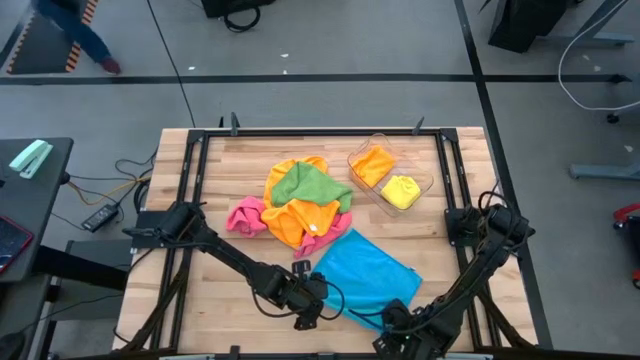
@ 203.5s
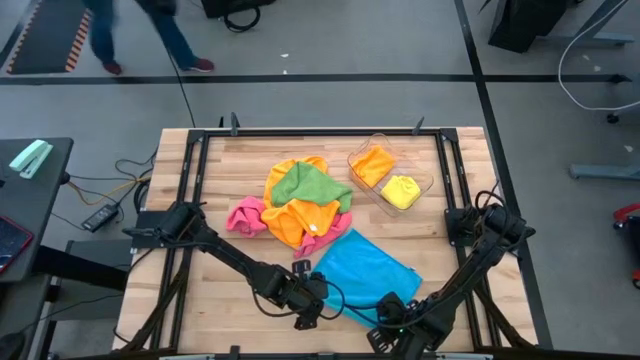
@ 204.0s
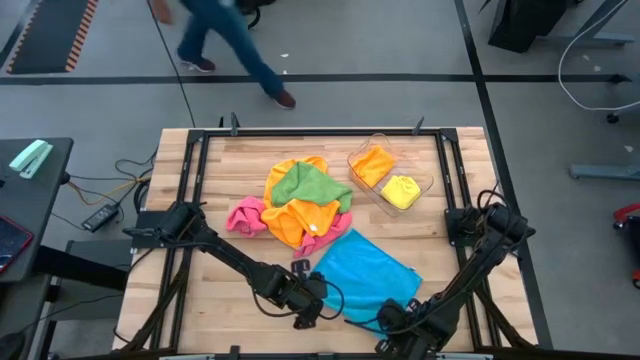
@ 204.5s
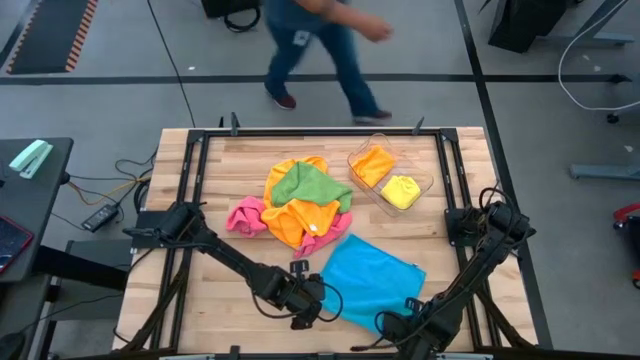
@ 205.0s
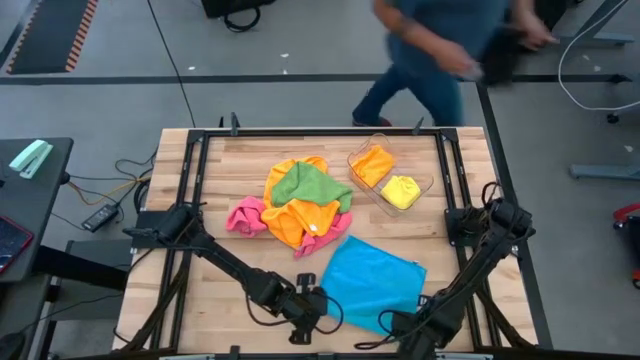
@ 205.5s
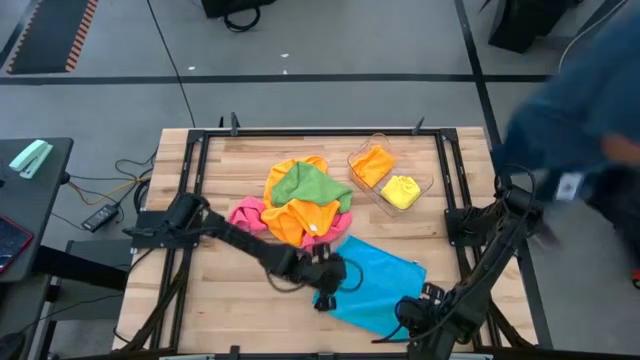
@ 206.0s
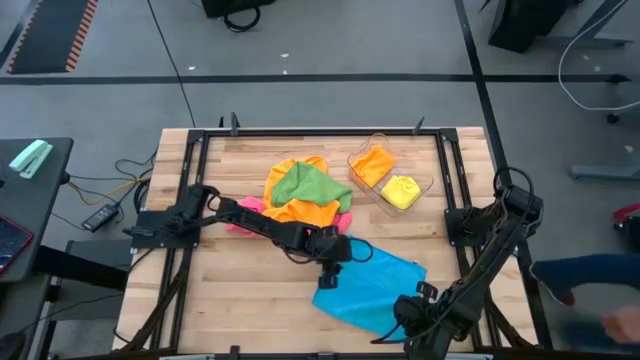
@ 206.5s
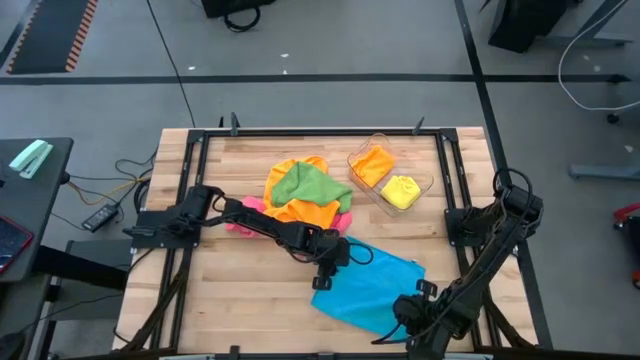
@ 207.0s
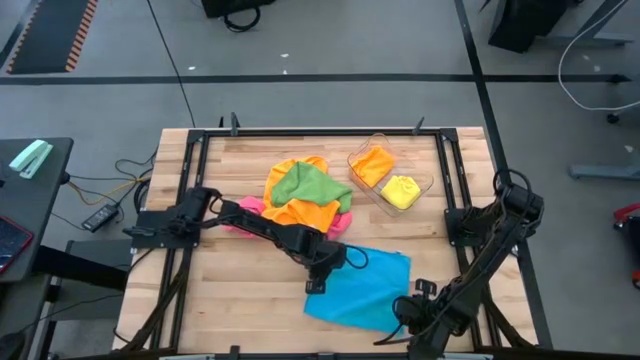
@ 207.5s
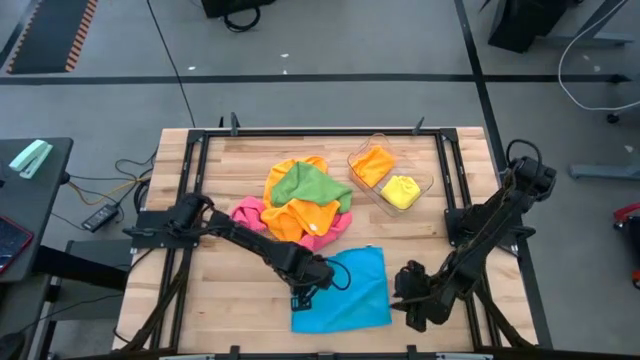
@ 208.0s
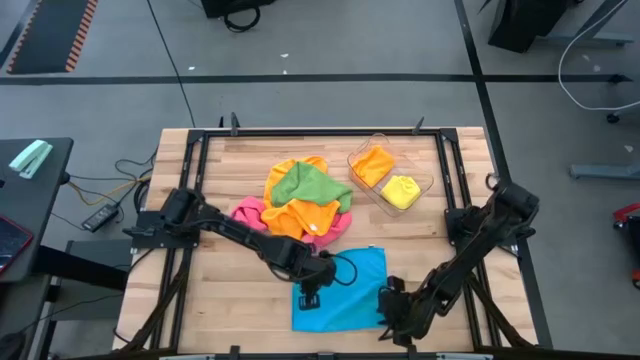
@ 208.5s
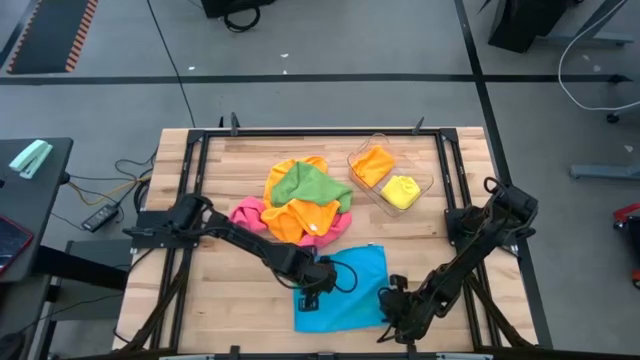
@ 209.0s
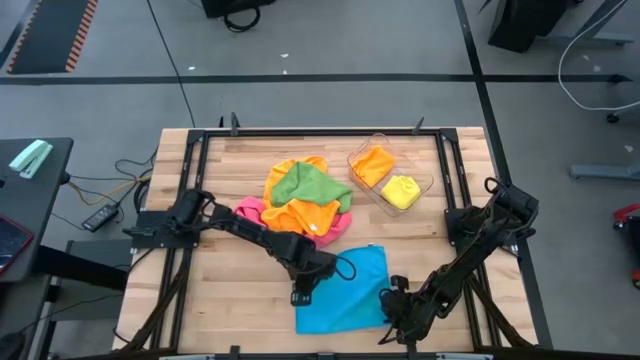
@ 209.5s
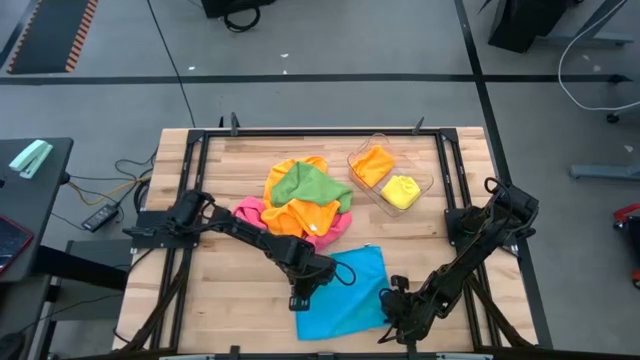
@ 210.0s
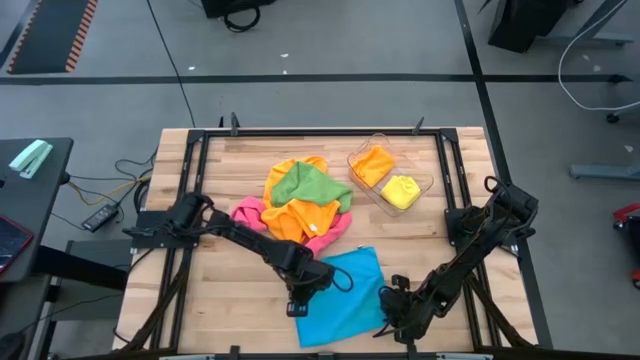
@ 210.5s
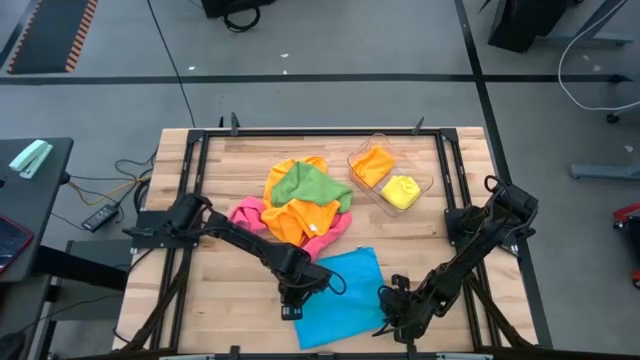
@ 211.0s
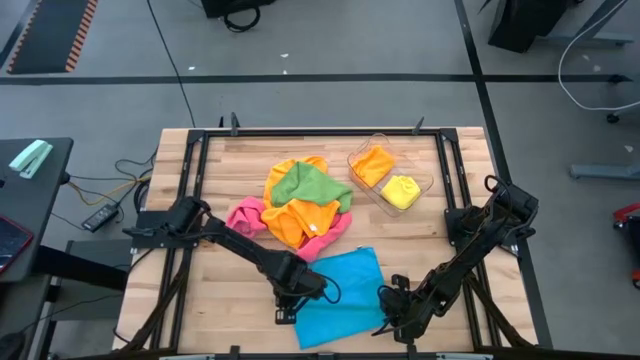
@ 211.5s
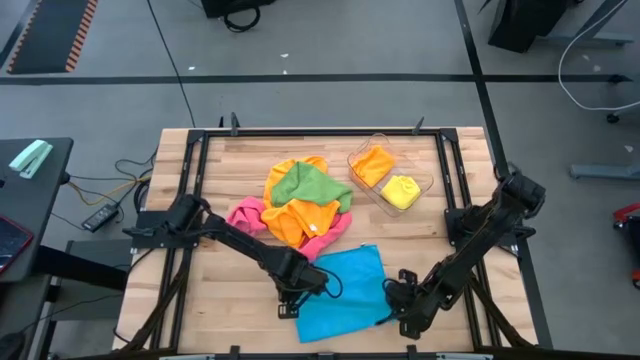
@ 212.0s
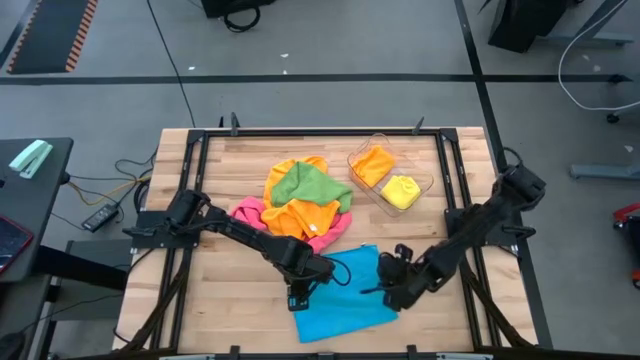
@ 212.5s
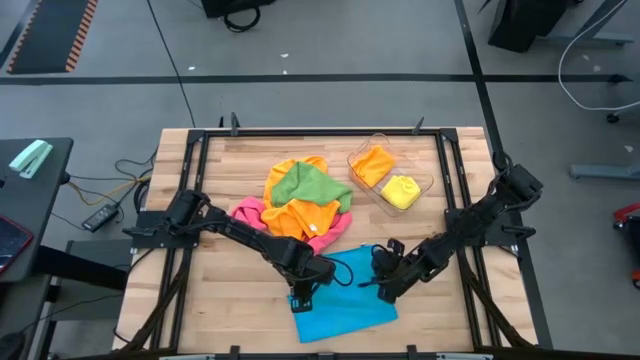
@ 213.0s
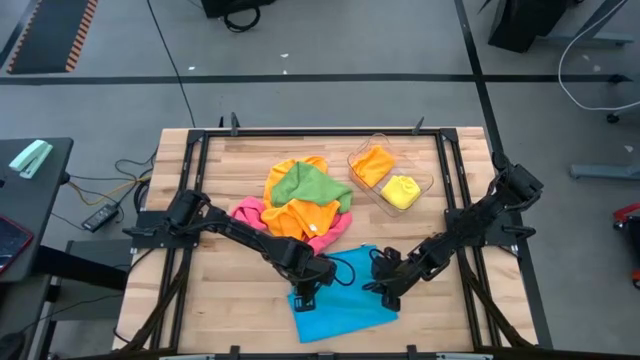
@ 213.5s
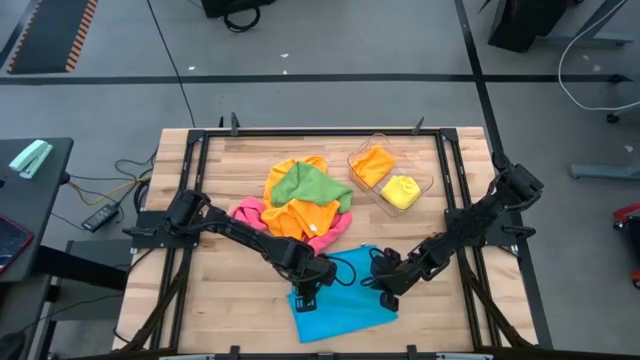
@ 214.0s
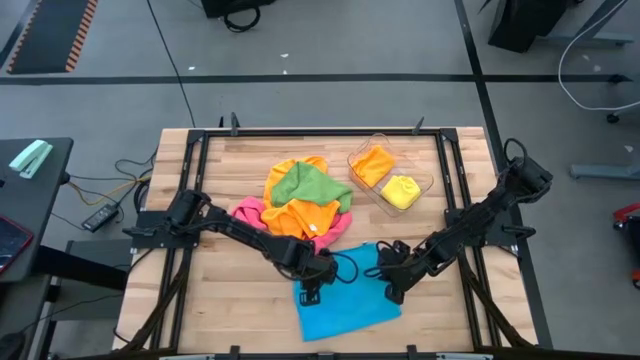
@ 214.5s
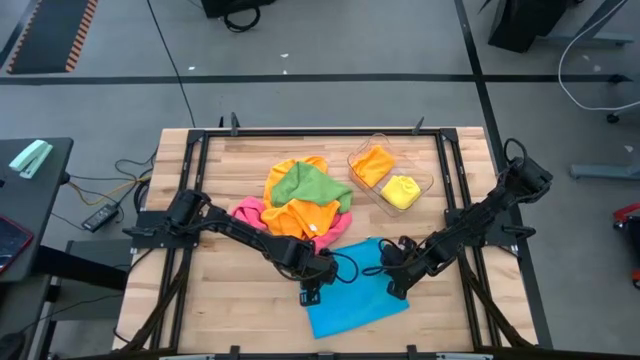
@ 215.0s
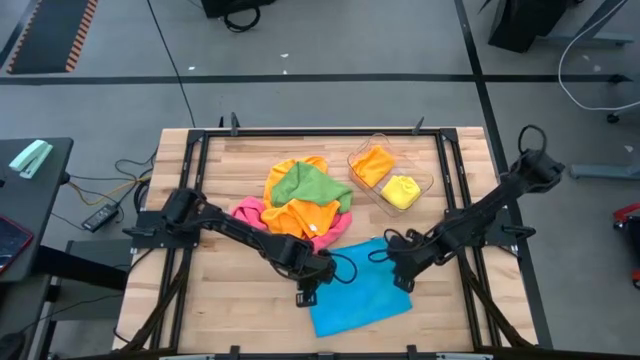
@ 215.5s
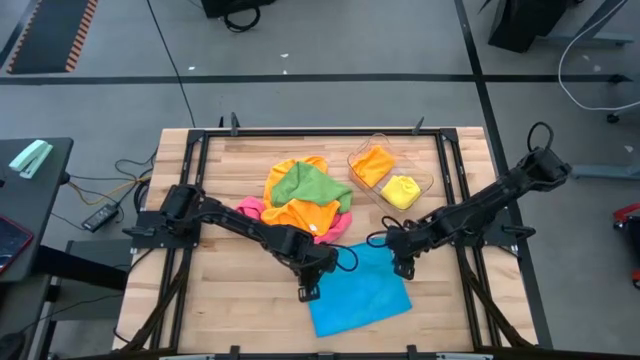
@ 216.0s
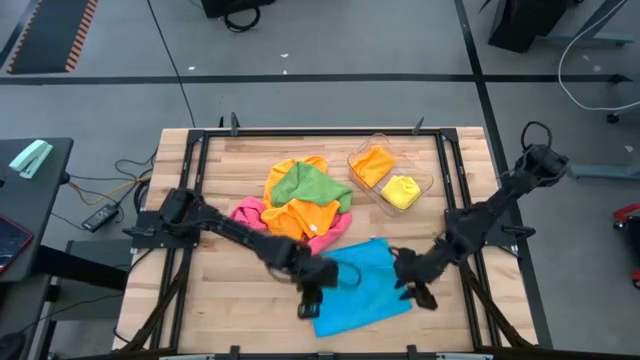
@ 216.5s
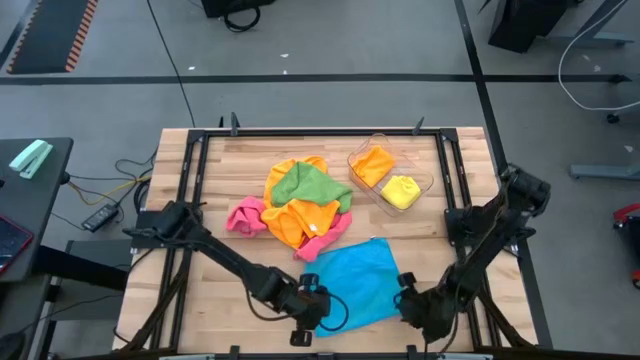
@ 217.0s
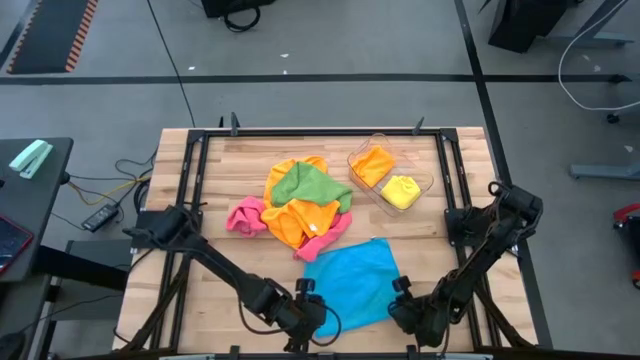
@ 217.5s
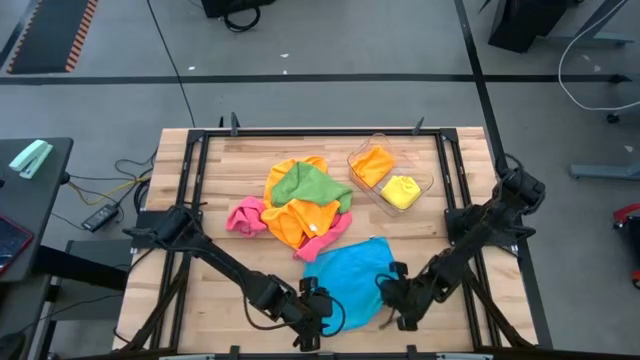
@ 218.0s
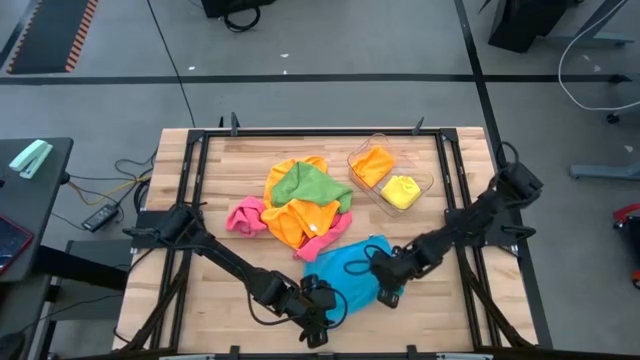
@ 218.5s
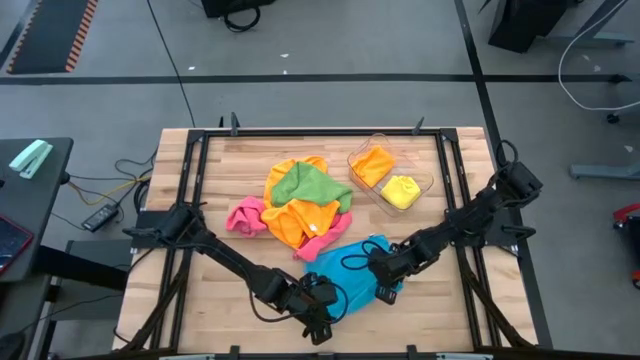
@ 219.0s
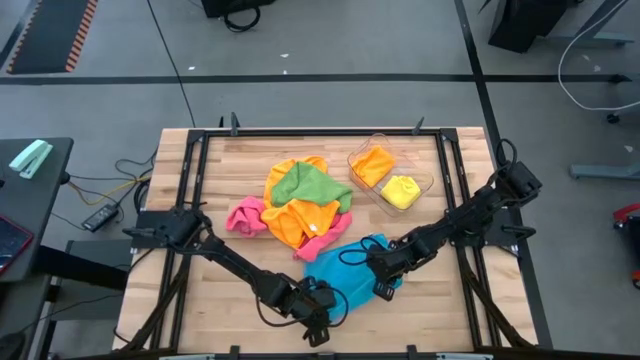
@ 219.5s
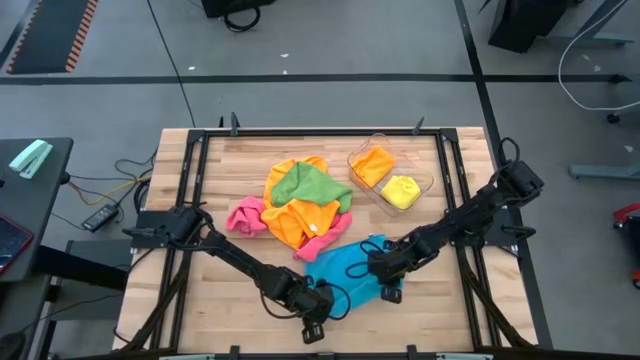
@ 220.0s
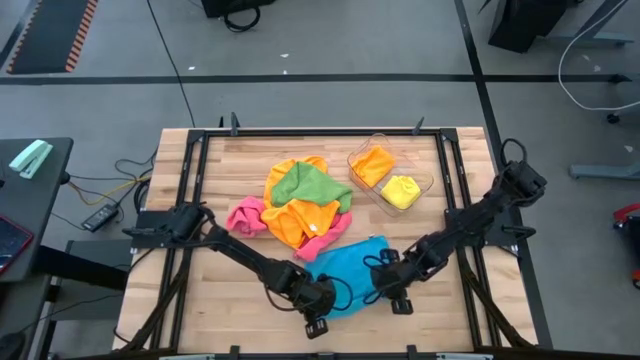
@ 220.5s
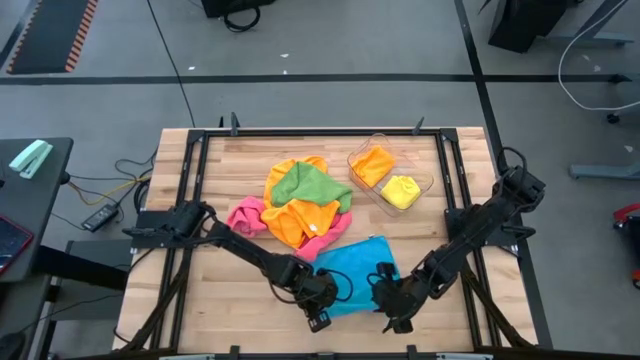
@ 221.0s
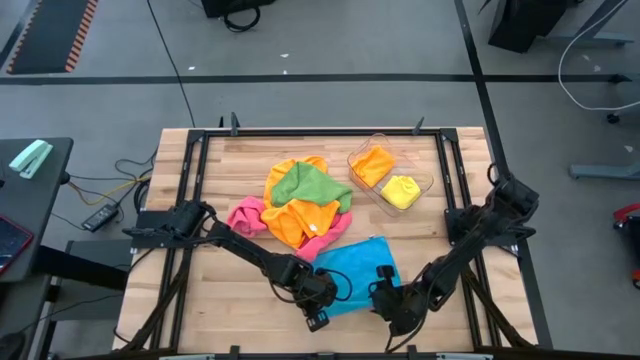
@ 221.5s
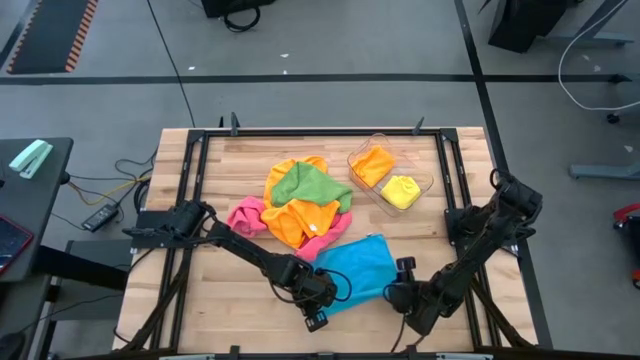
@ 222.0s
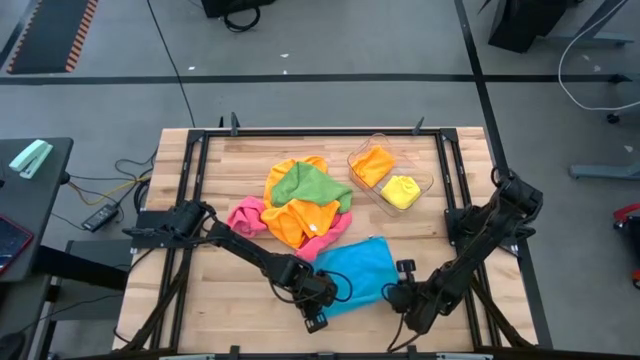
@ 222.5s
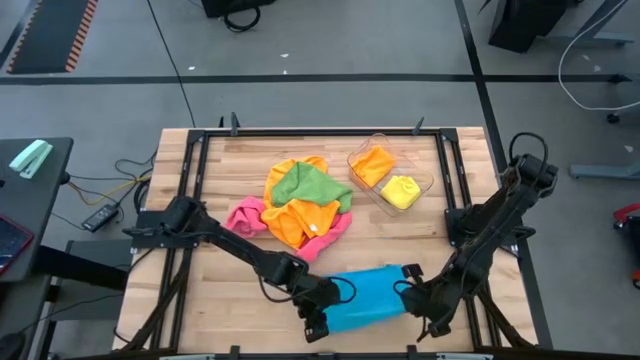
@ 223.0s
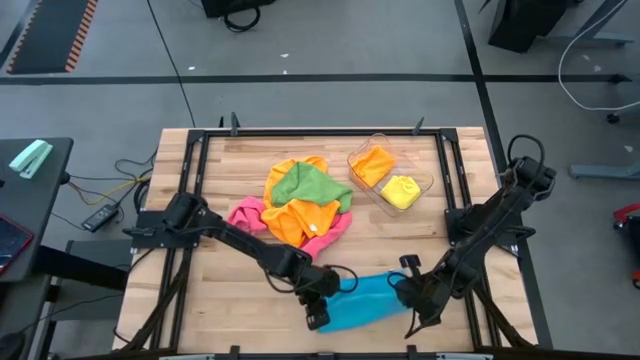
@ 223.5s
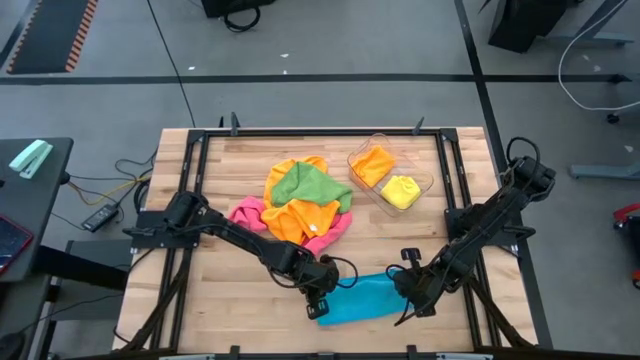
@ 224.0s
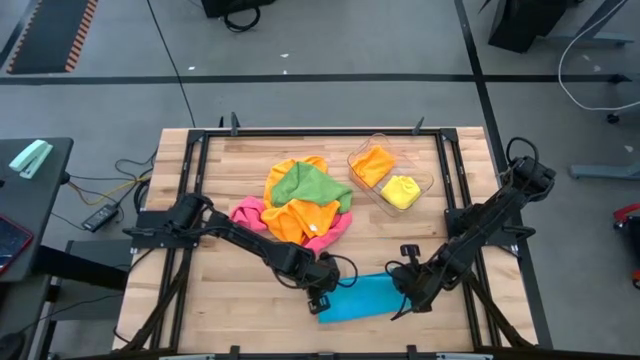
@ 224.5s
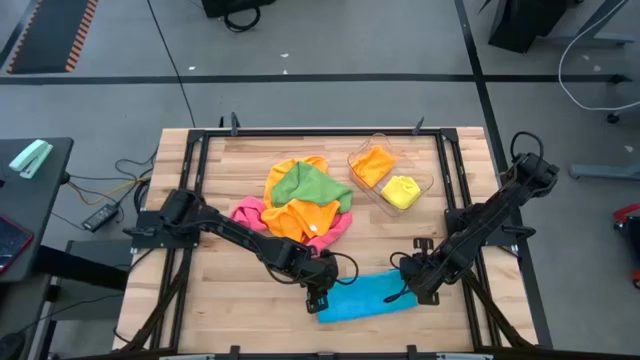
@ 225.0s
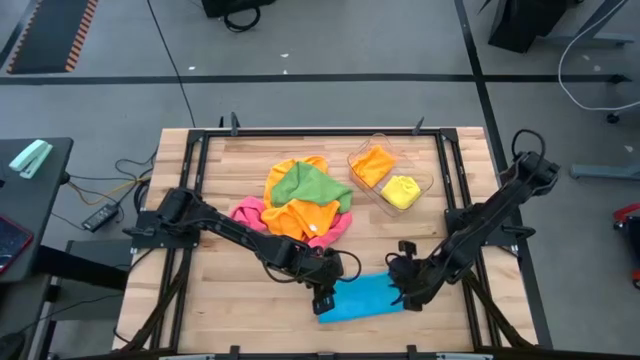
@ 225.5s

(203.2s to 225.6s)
Task: Fold microfiber towels
Fold the blue towel
